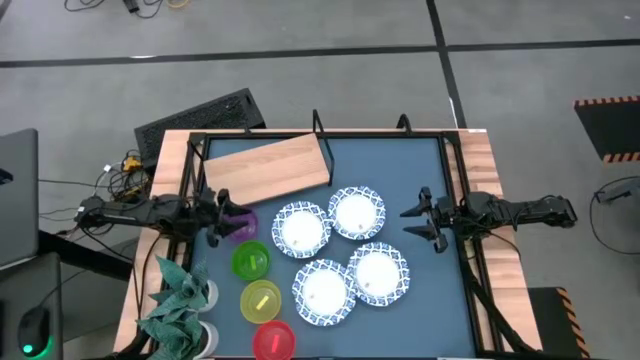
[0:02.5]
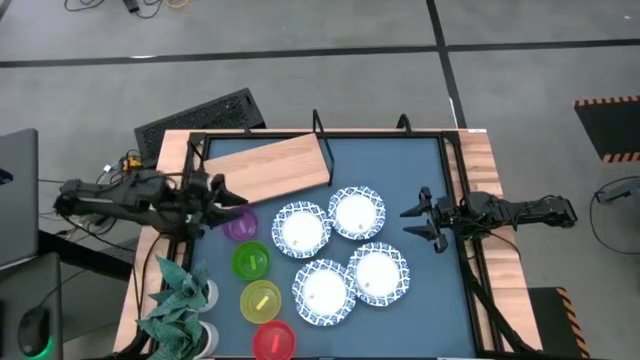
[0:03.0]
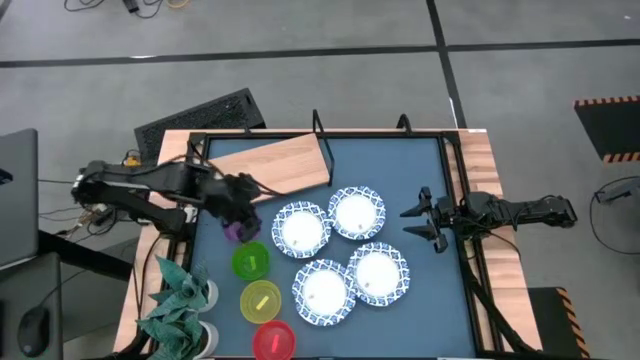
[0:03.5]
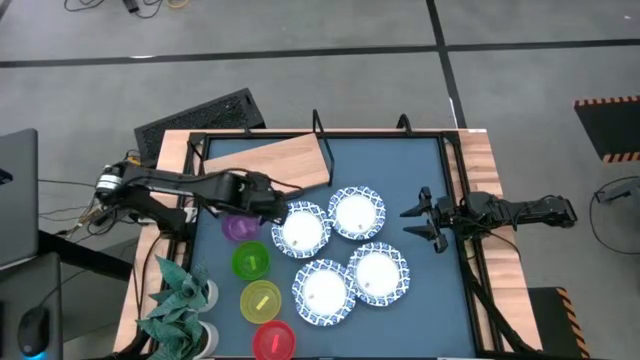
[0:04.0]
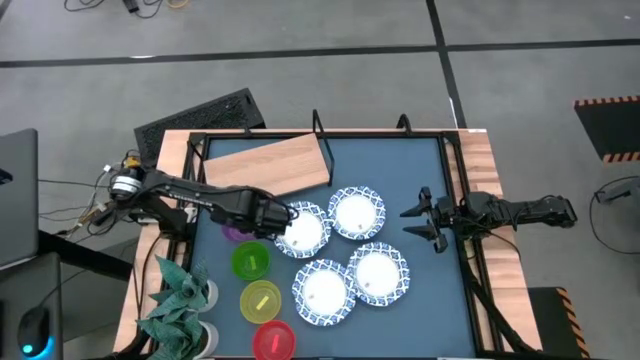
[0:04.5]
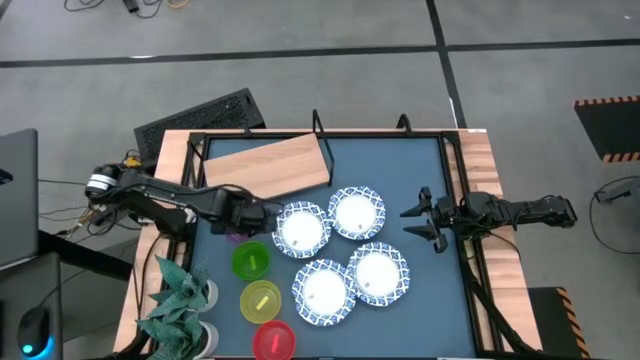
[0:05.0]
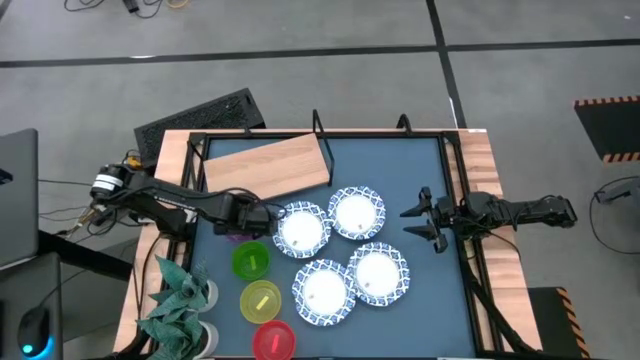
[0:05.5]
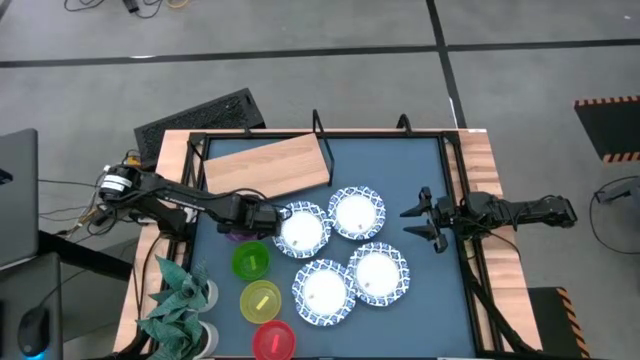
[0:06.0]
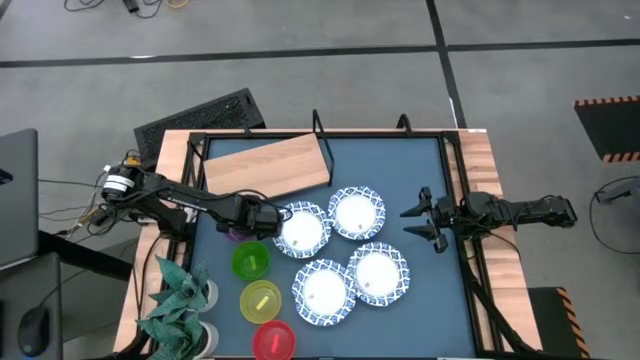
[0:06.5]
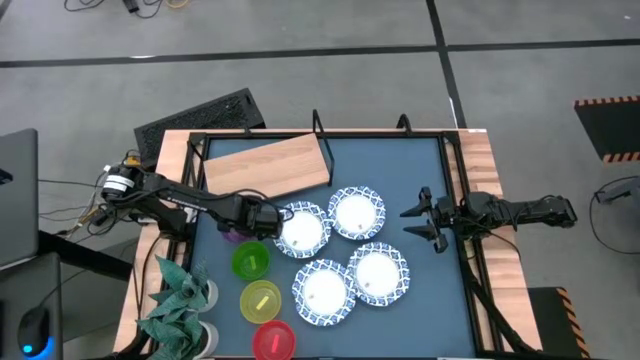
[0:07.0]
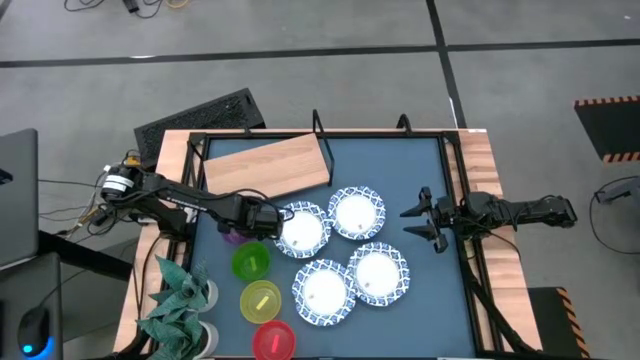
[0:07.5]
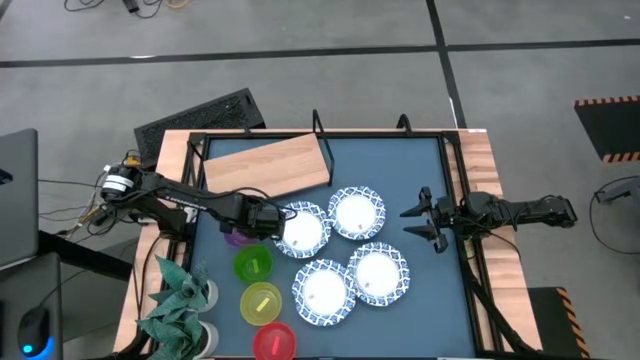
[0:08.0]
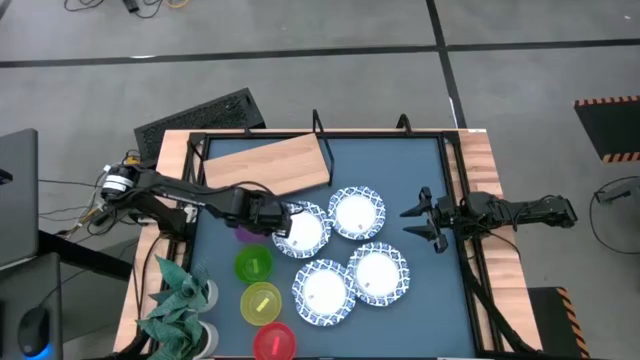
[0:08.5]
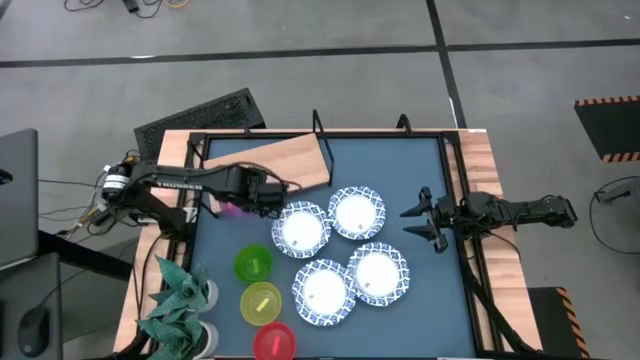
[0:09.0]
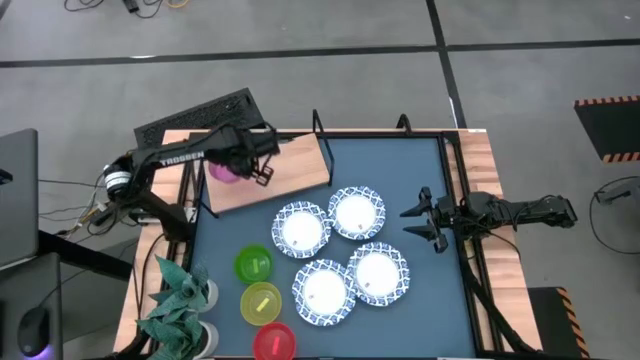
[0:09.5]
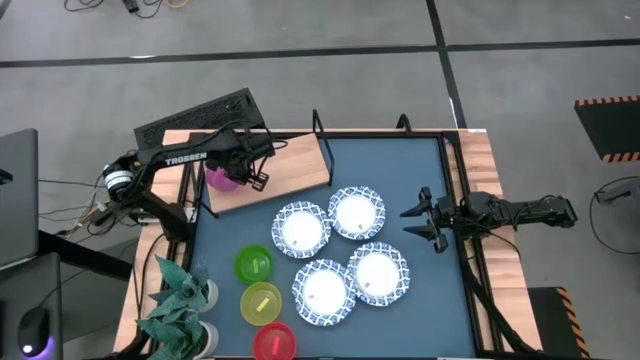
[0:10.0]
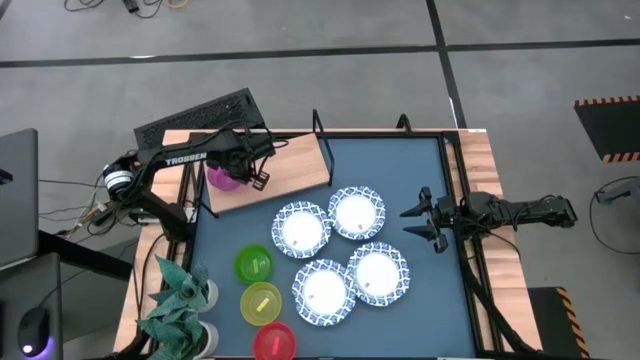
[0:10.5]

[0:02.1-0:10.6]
Task: Place and stack bowls onto a shelf
Put the purple bowl on the shelf

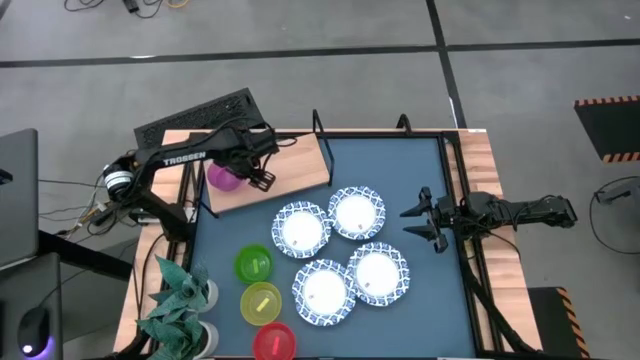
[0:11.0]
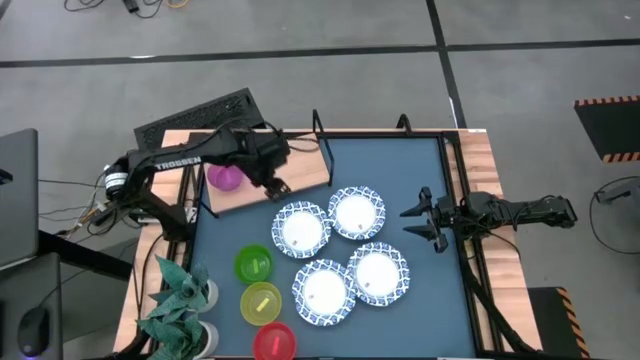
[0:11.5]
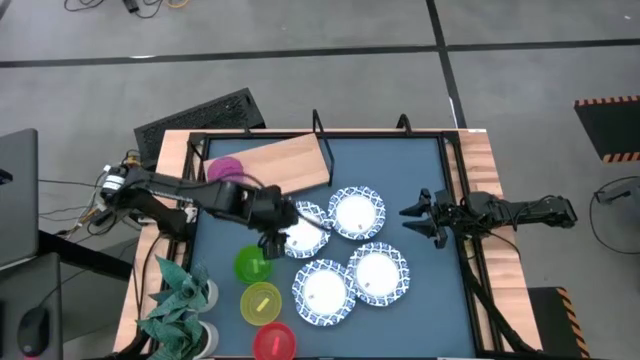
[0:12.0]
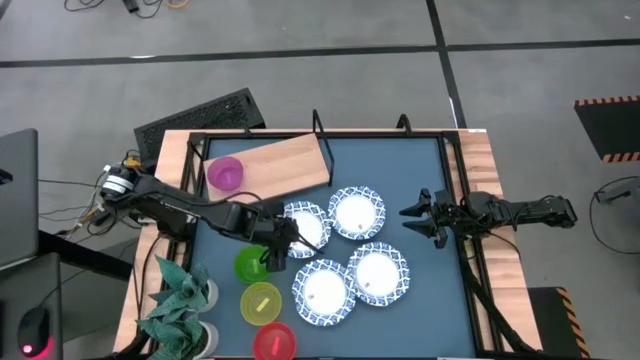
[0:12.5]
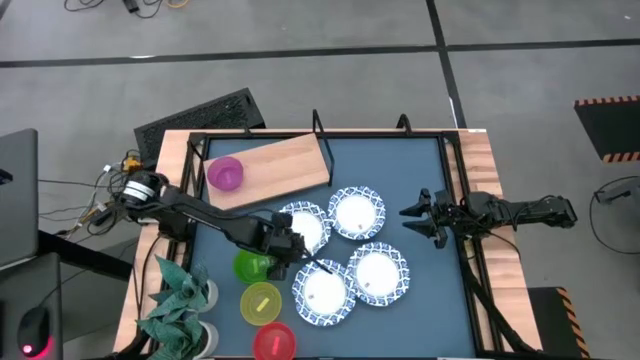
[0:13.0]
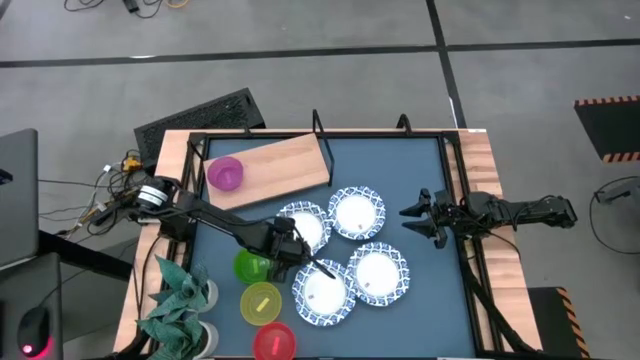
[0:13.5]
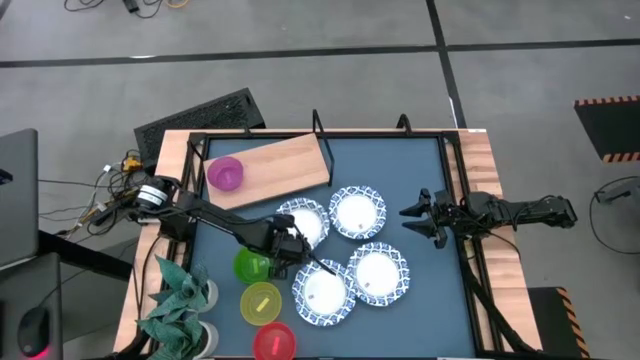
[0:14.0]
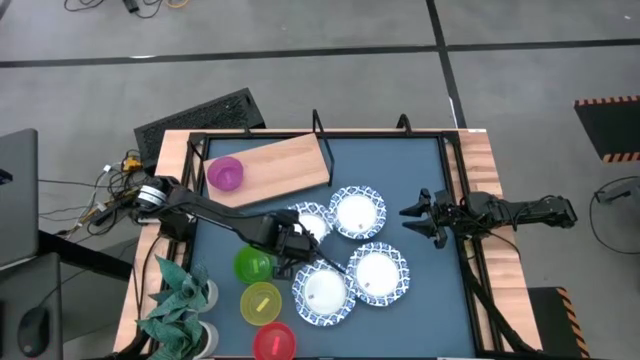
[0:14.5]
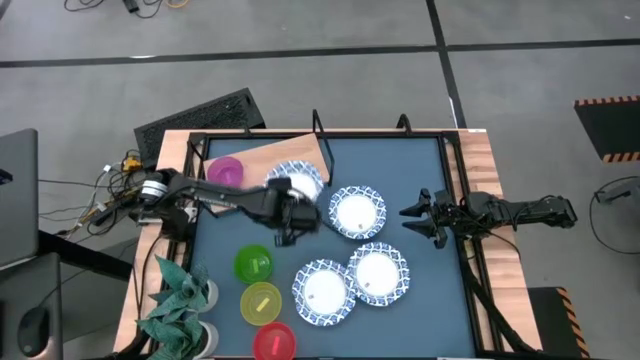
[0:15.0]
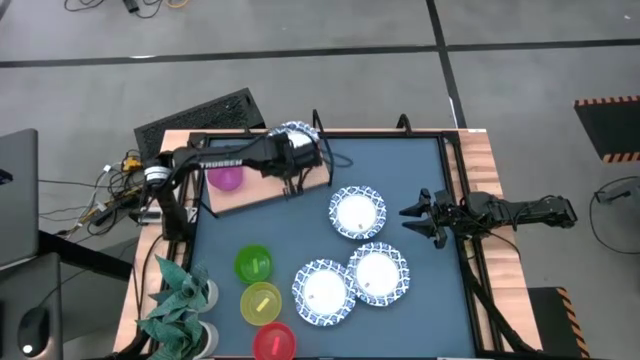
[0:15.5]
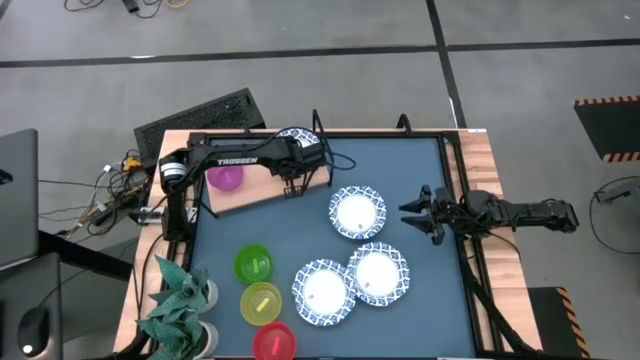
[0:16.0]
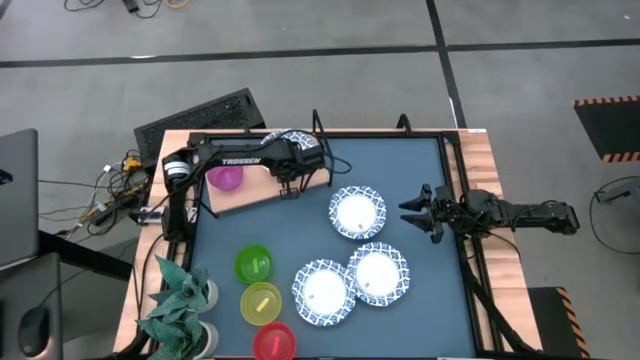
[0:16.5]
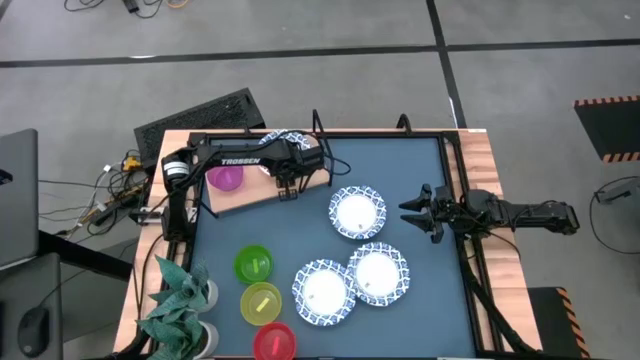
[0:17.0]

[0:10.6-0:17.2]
Put the top left white-blue bowl on the shelf

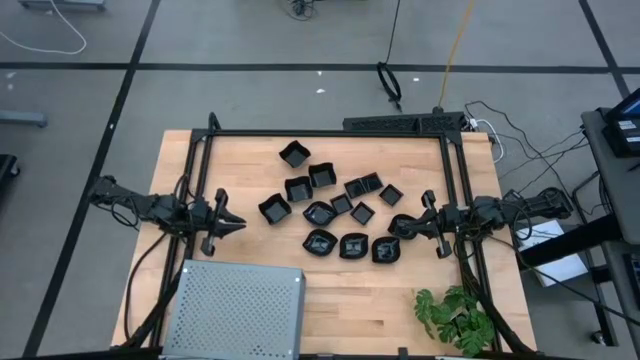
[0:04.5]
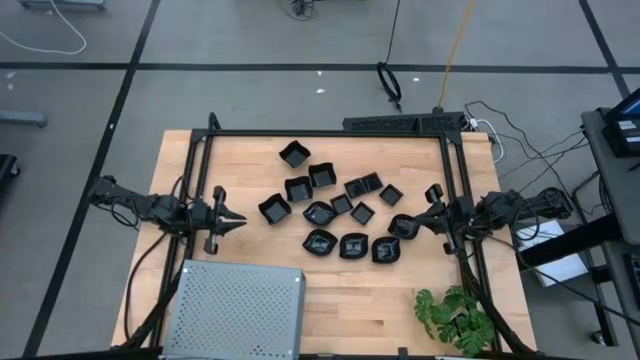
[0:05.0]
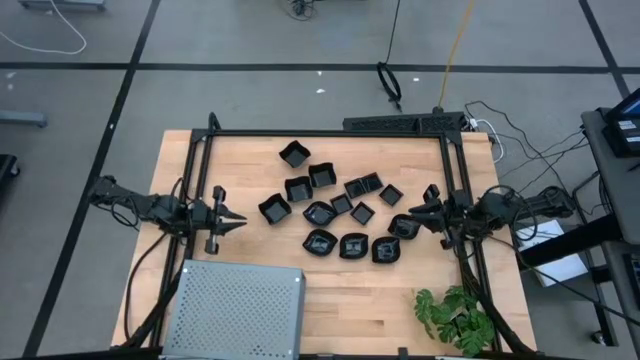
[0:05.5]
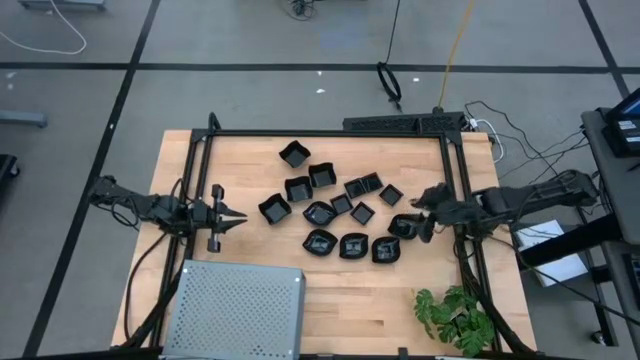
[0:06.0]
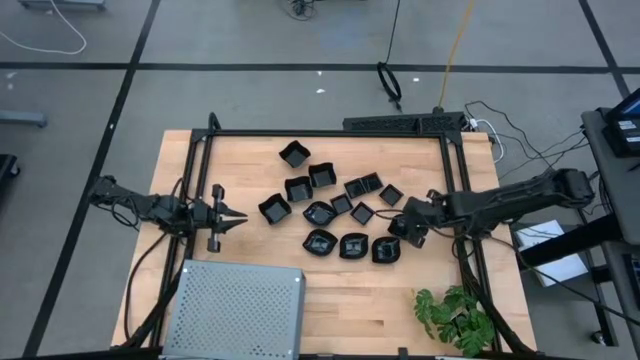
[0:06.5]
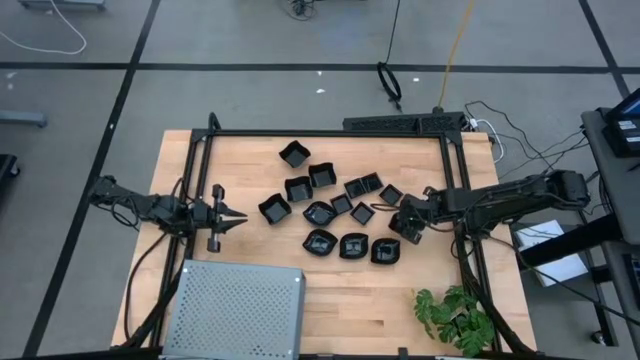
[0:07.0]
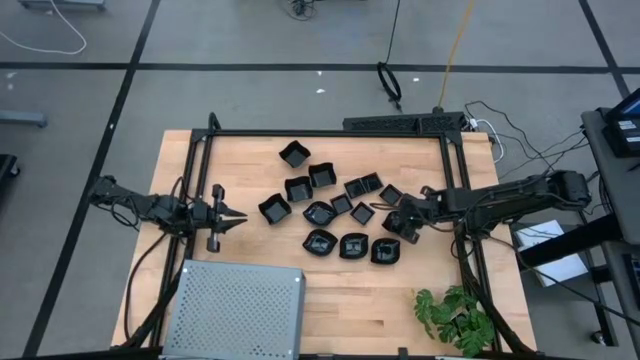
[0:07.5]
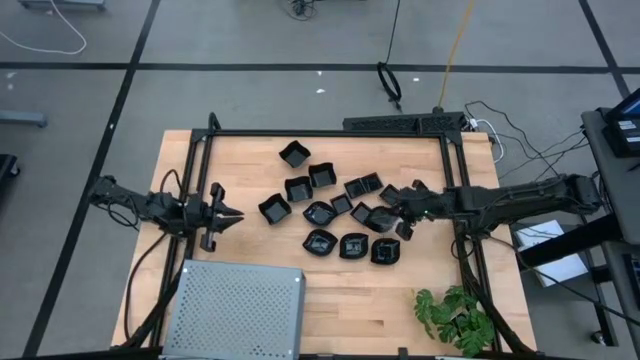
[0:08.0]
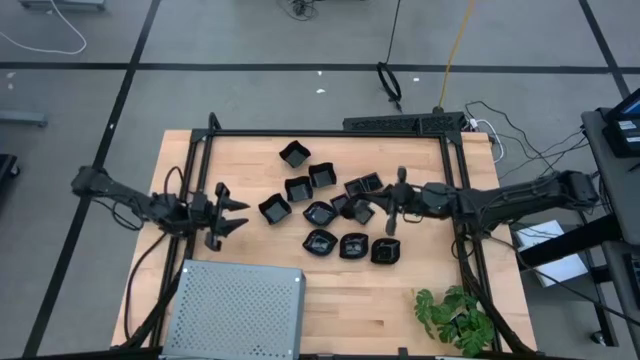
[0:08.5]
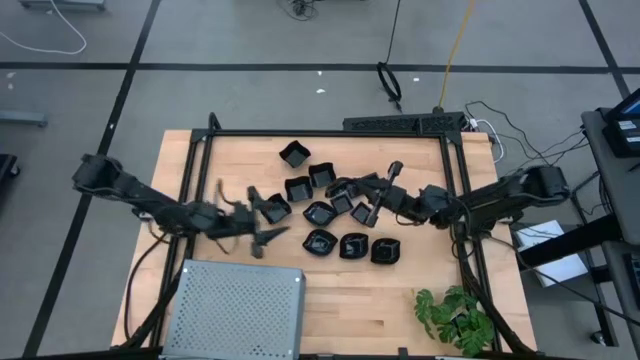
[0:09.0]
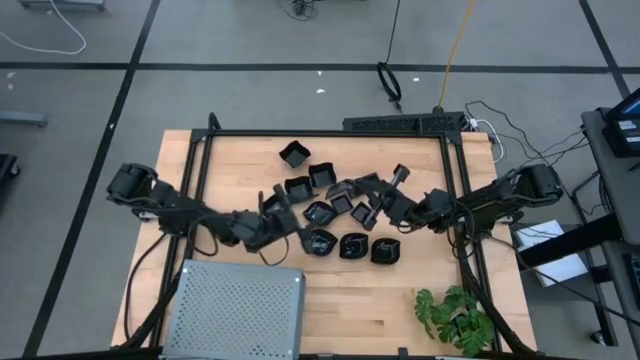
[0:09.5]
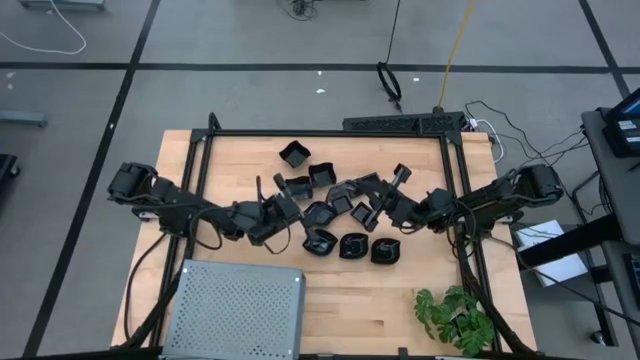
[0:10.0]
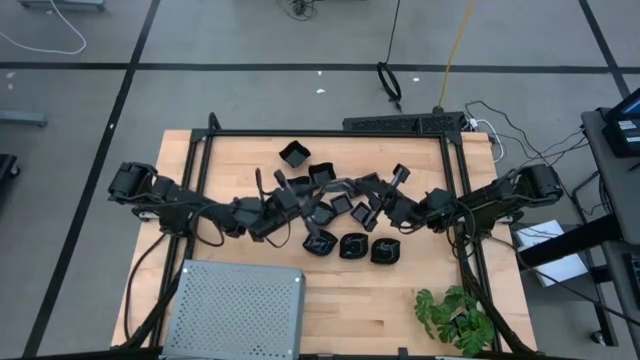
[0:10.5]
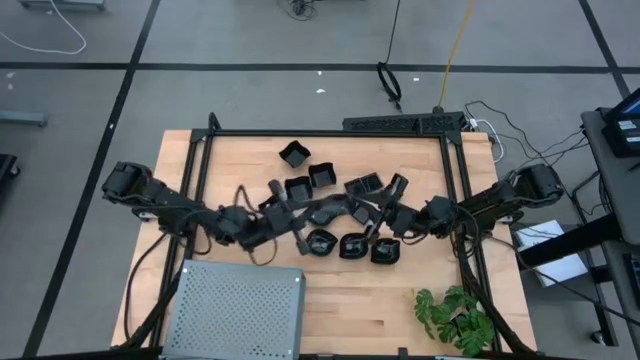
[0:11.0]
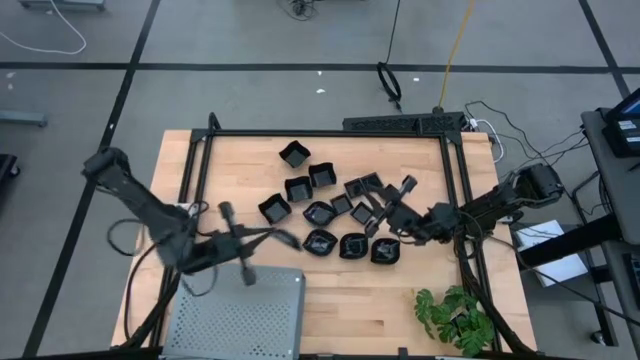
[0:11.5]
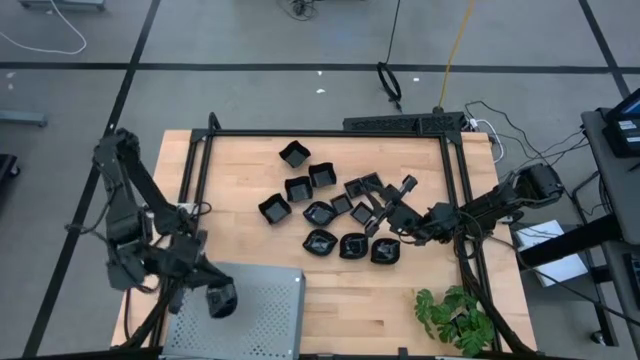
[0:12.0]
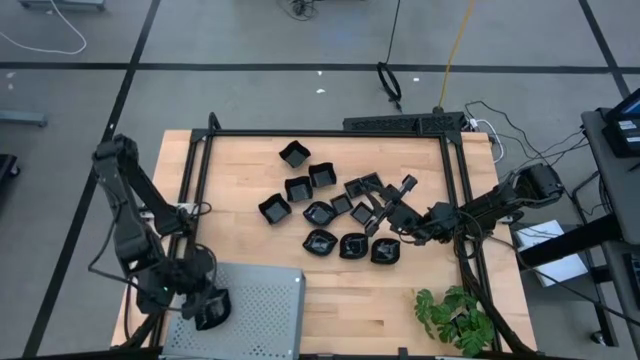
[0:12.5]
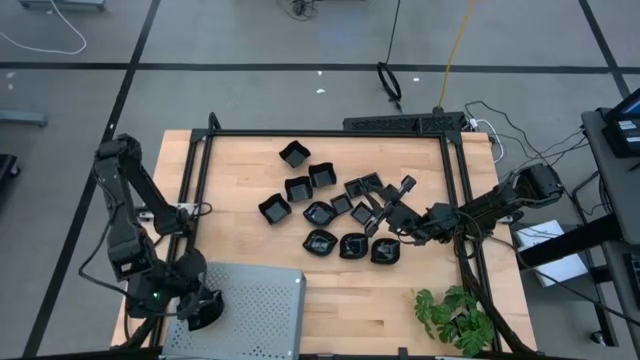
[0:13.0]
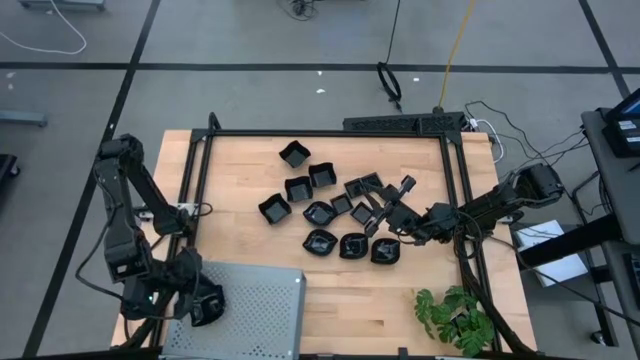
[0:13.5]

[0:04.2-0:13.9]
Task: Pick & Place Mini shaped plates
Put the leaf-shaped plate on the shelf
